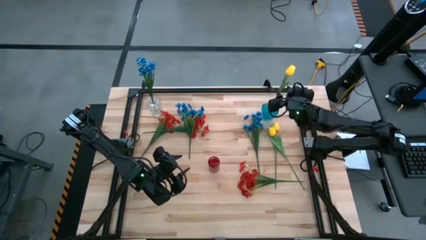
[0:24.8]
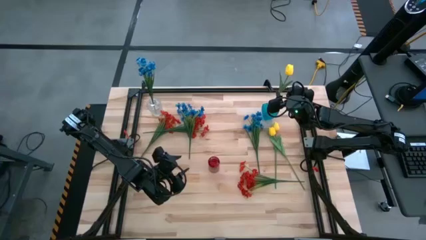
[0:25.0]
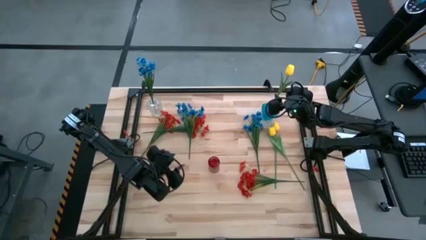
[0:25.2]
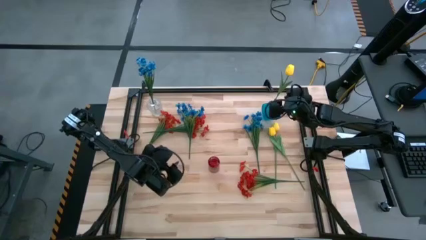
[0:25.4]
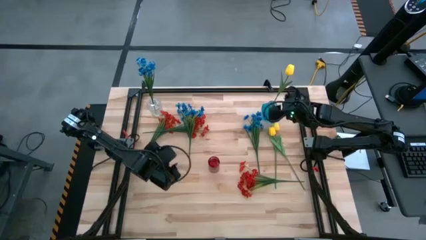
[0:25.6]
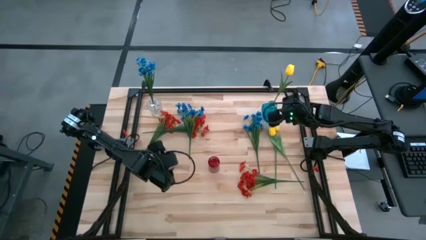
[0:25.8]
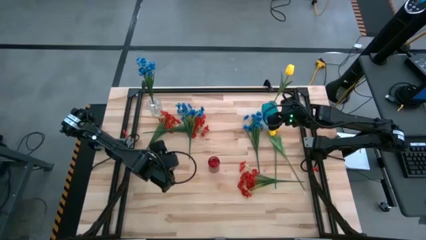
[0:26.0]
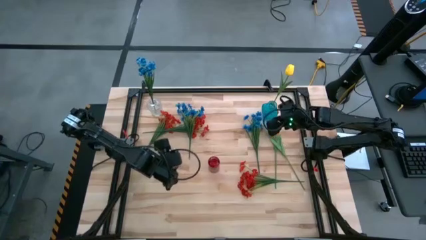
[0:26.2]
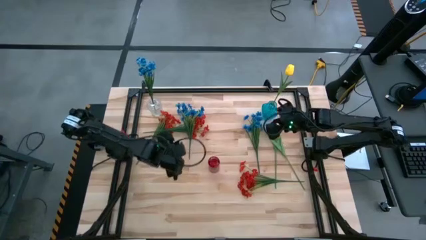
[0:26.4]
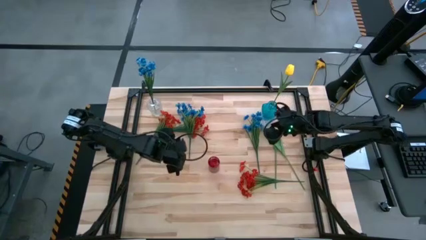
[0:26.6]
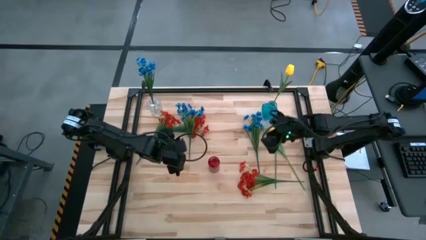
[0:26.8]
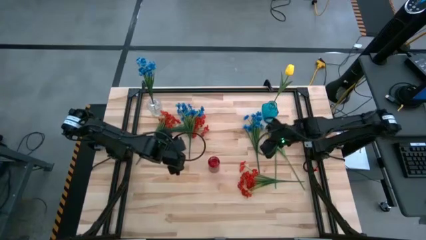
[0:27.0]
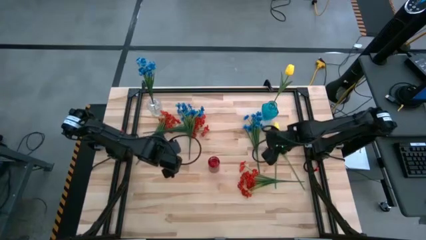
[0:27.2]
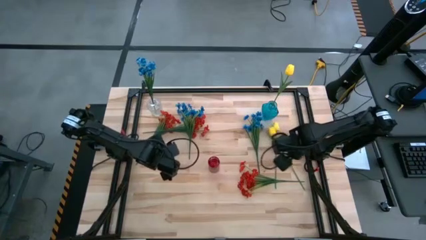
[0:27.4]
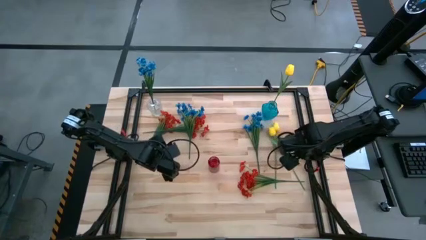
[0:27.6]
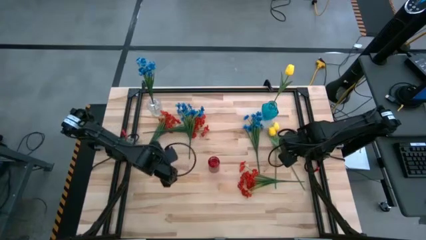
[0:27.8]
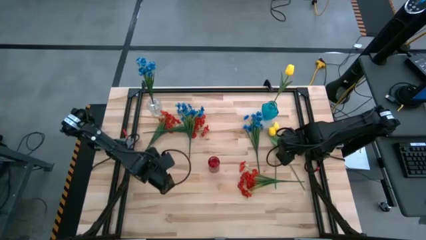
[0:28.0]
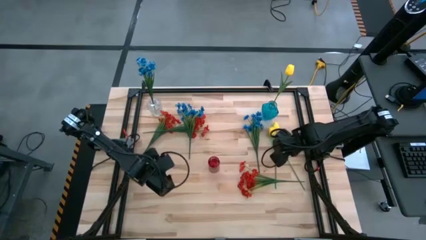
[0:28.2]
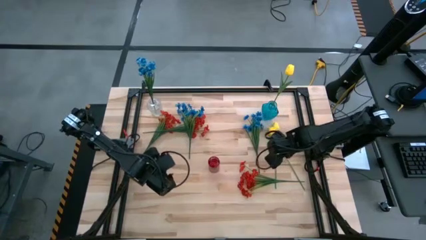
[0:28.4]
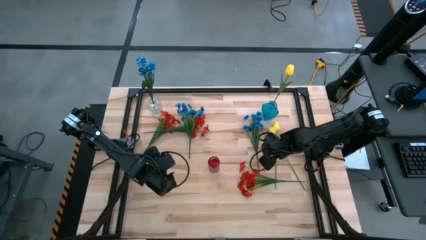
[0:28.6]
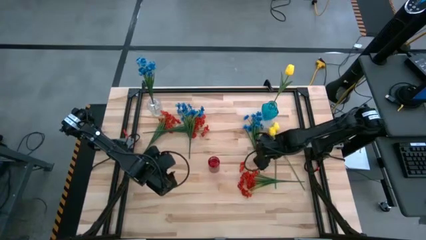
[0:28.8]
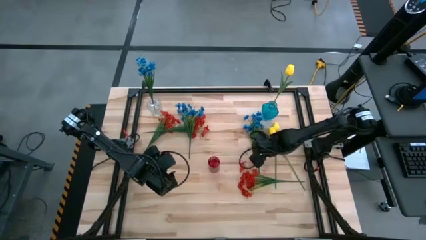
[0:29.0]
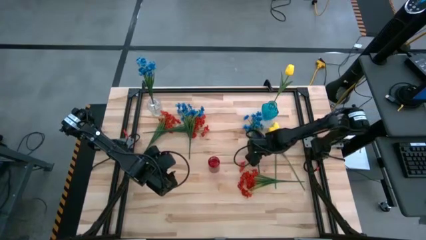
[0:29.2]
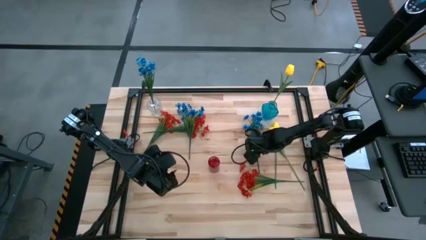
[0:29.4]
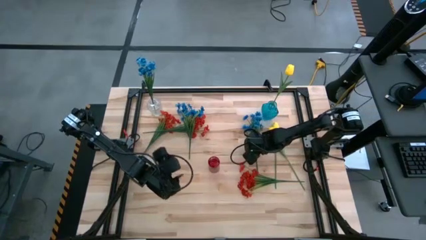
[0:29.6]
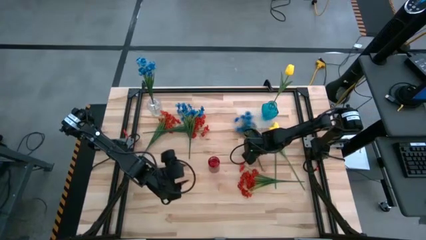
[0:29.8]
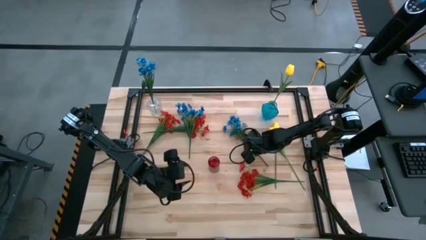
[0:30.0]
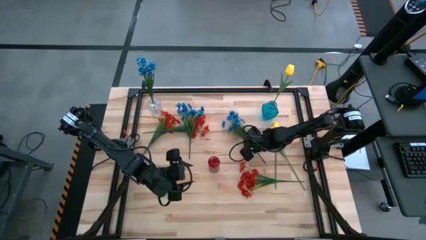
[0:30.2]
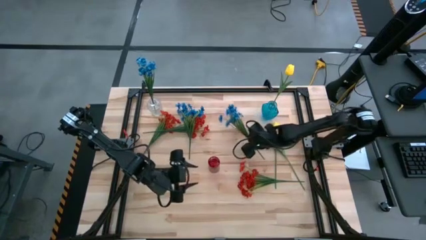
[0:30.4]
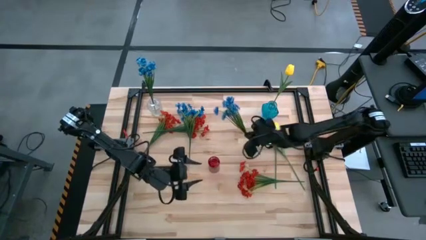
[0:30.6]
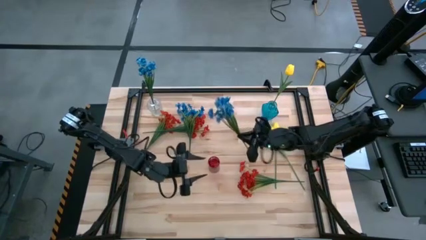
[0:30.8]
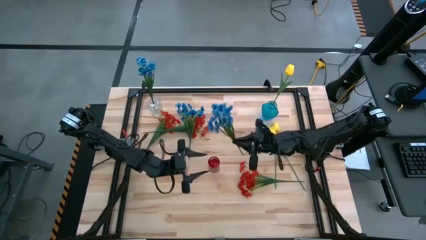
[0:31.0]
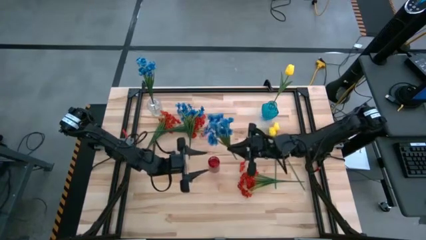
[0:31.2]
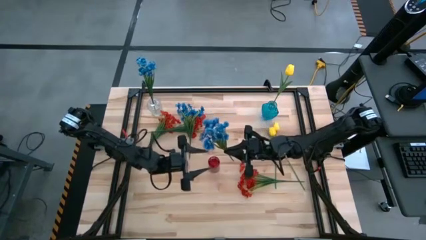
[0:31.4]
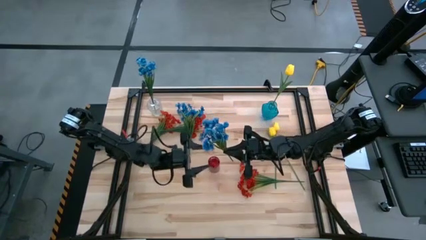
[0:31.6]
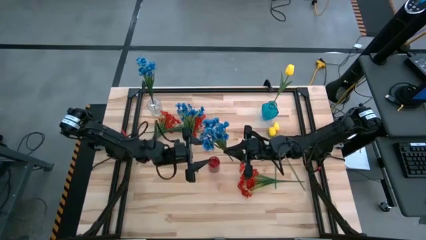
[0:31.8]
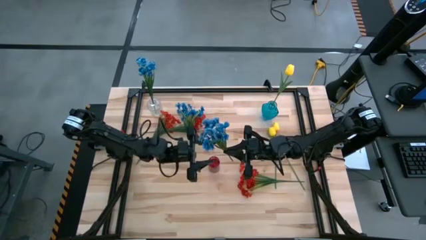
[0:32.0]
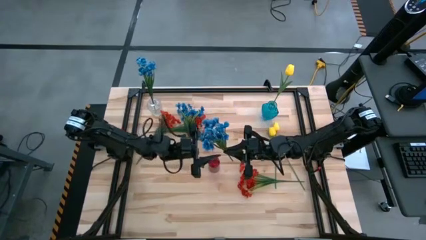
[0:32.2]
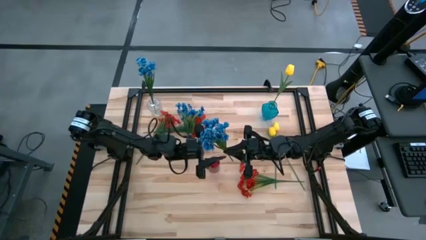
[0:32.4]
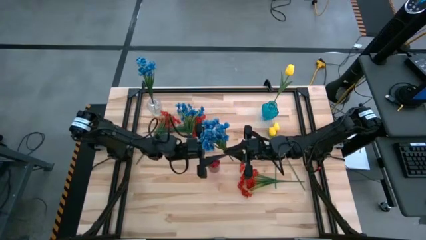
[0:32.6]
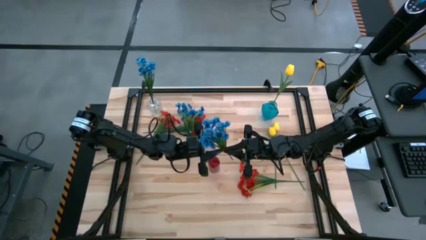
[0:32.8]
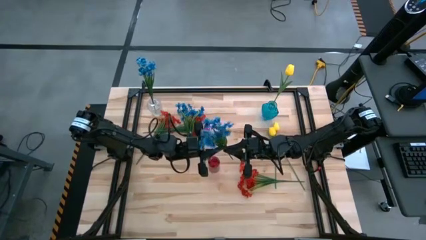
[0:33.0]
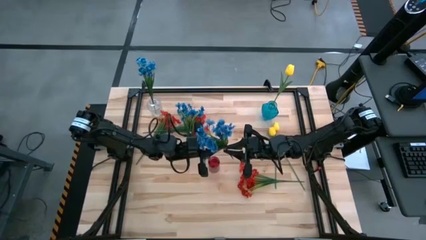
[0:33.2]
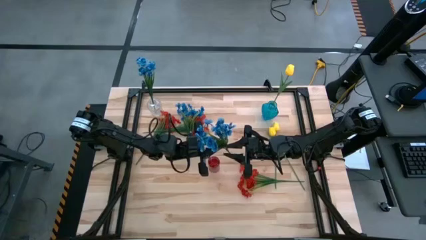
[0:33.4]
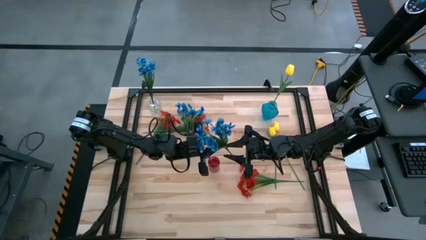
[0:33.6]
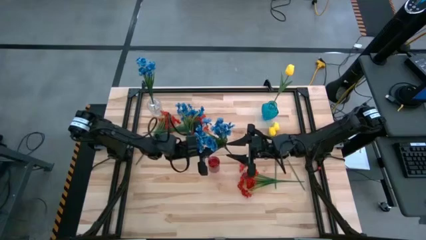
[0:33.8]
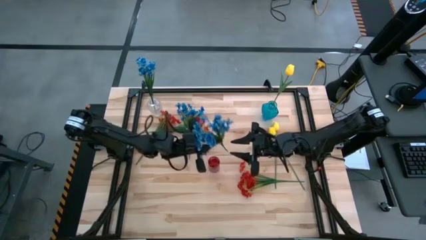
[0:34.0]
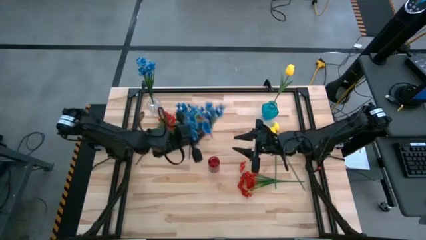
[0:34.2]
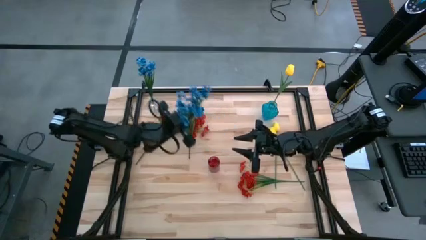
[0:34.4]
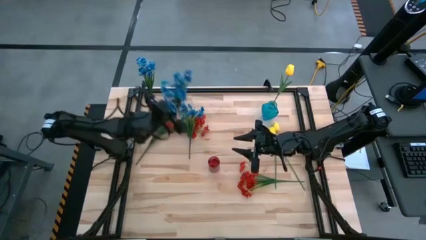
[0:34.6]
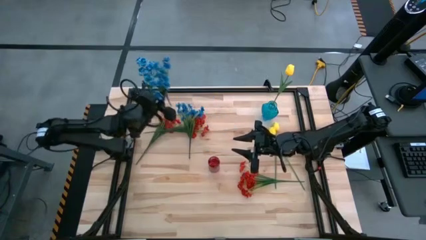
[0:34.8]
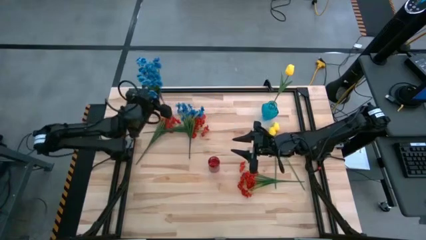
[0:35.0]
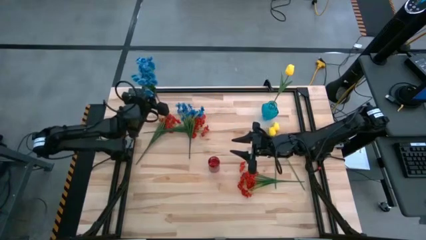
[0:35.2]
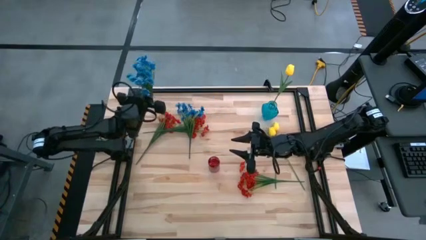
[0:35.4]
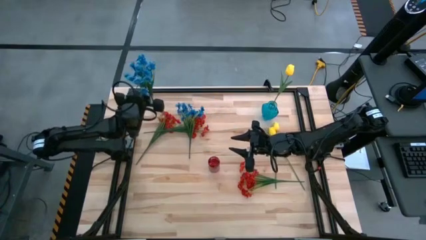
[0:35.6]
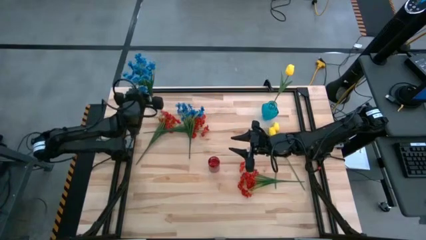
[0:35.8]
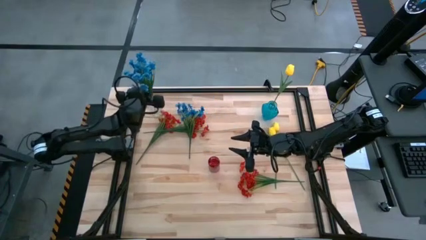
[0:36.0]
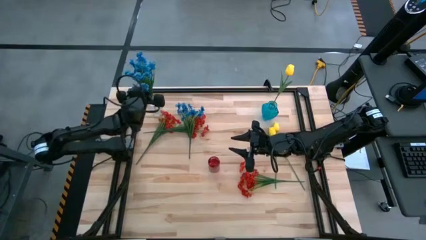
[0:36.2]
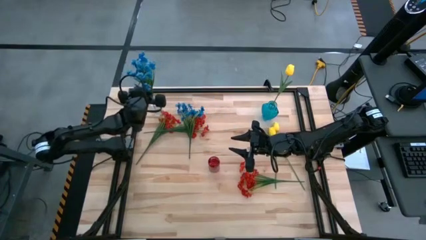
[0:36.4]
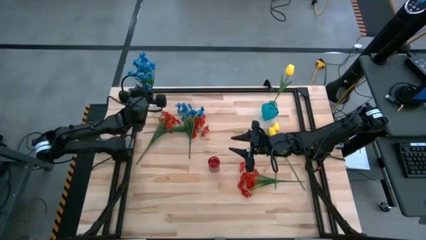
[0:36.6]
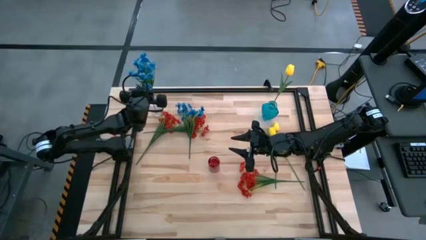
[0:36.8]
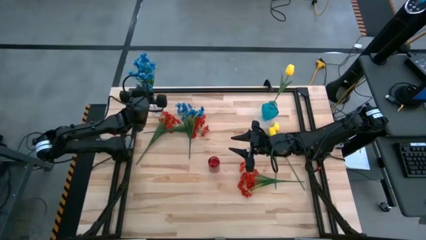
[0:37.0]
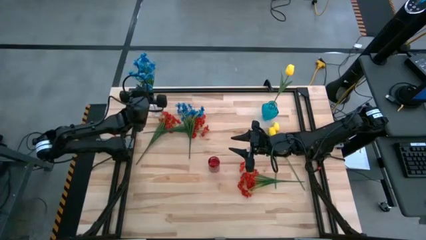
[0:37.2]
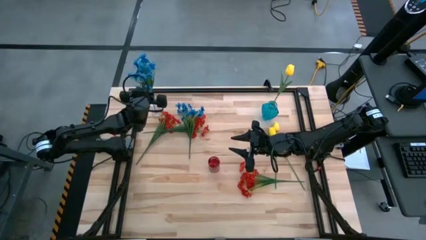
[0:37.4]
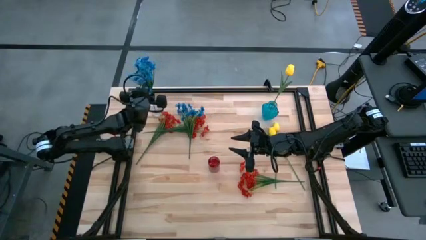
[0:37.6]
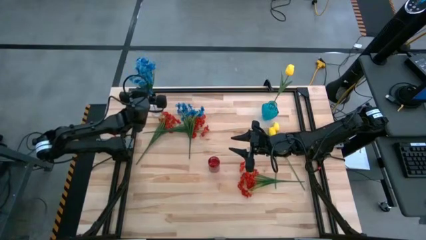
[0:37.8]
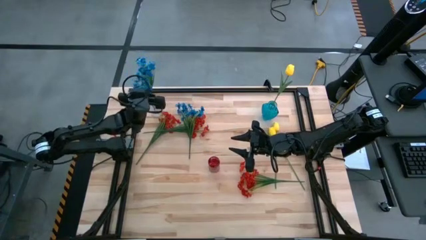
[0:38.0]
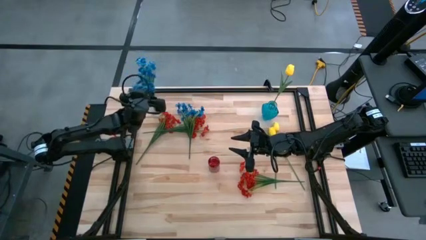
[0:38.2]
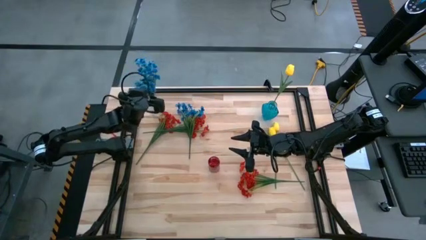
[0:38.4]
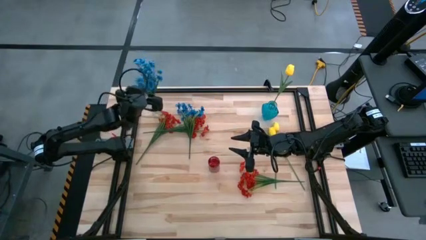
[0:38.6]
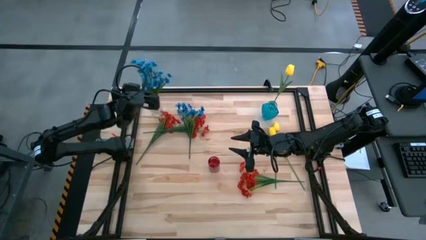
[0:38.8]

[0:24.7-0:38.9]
Task: Sort flowers into vase by color
Put the right blue flowers into the transparent vase
